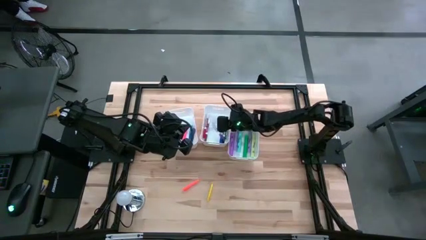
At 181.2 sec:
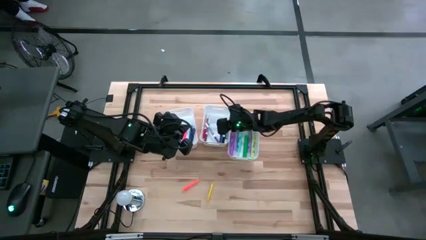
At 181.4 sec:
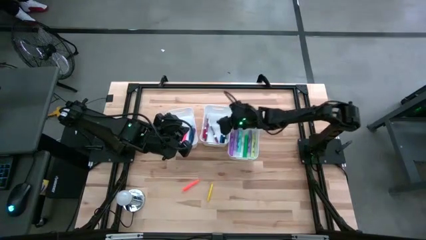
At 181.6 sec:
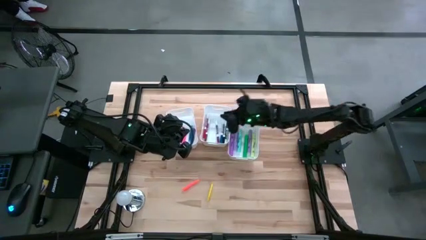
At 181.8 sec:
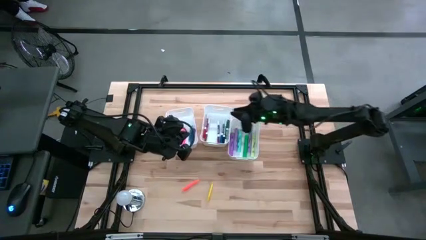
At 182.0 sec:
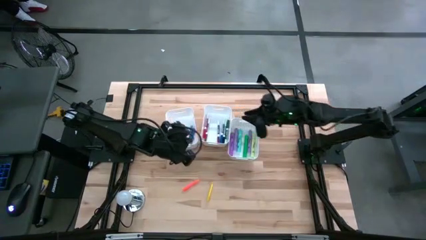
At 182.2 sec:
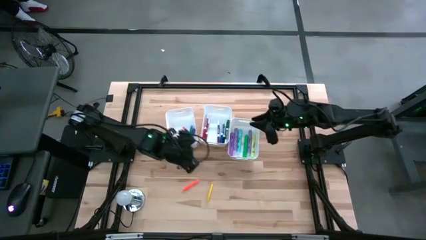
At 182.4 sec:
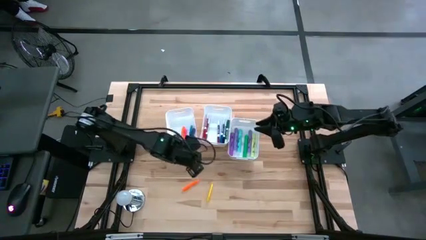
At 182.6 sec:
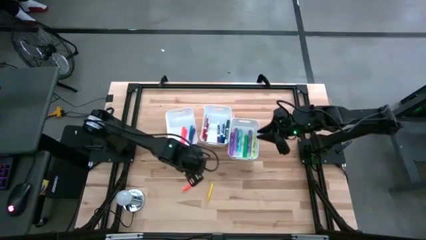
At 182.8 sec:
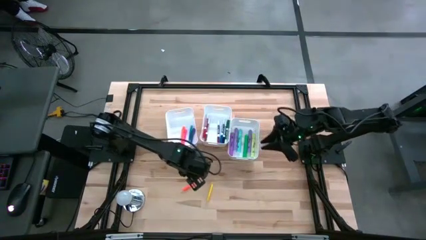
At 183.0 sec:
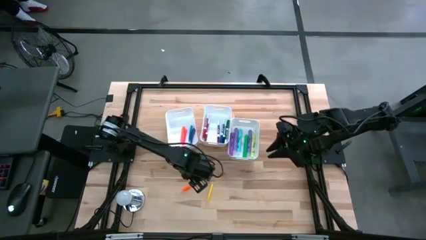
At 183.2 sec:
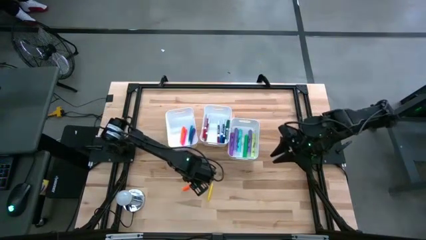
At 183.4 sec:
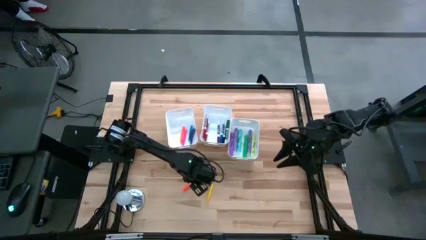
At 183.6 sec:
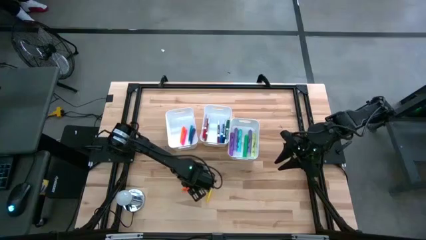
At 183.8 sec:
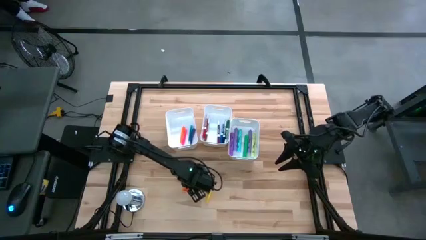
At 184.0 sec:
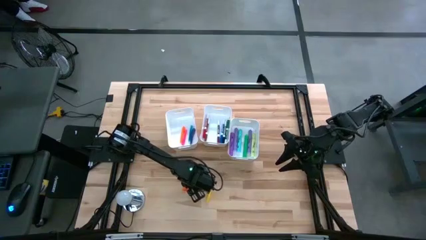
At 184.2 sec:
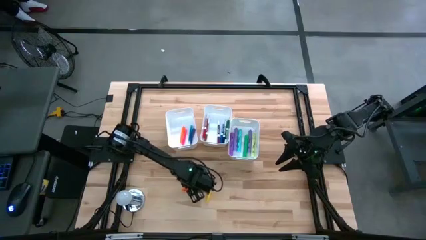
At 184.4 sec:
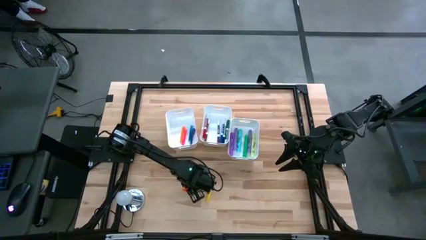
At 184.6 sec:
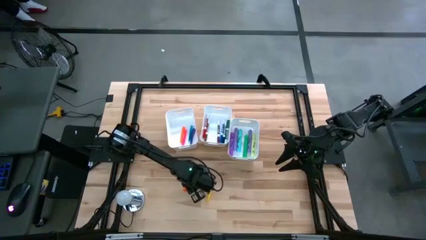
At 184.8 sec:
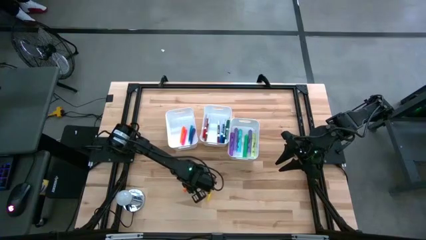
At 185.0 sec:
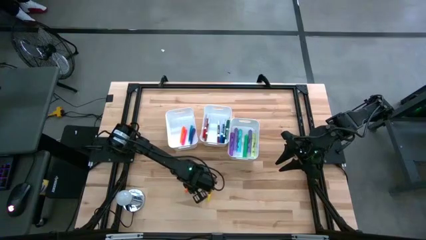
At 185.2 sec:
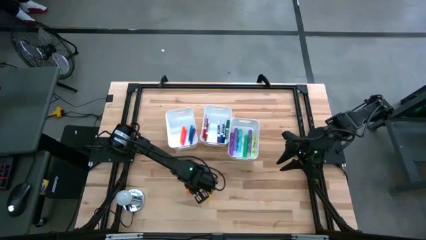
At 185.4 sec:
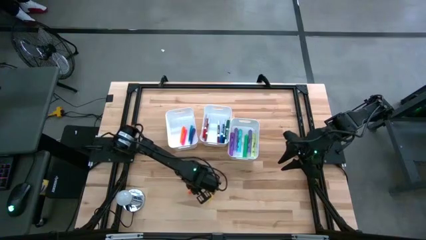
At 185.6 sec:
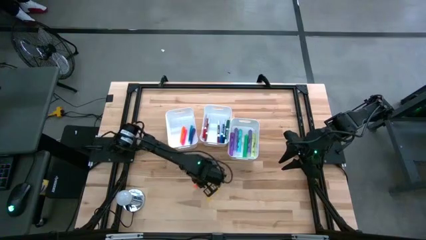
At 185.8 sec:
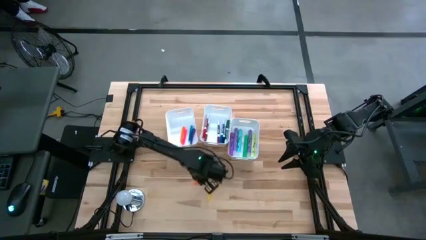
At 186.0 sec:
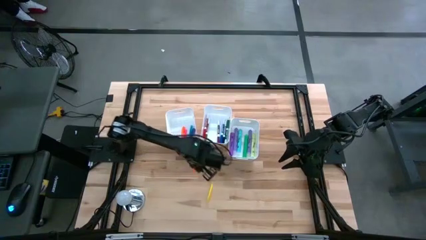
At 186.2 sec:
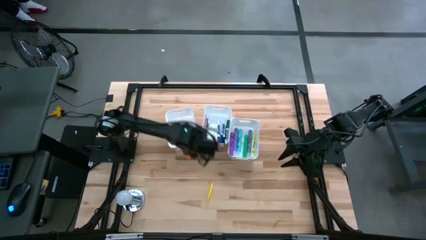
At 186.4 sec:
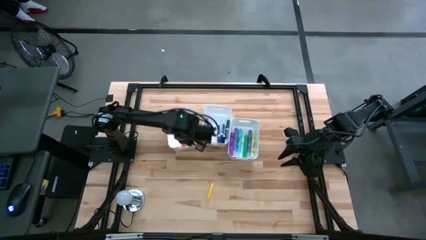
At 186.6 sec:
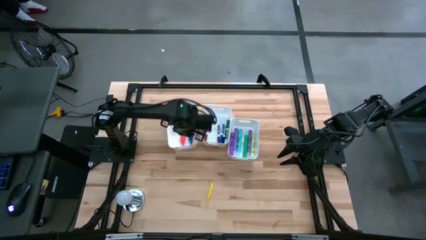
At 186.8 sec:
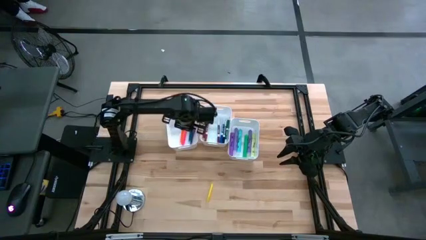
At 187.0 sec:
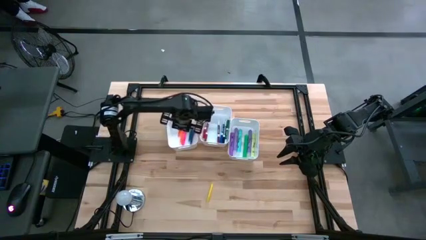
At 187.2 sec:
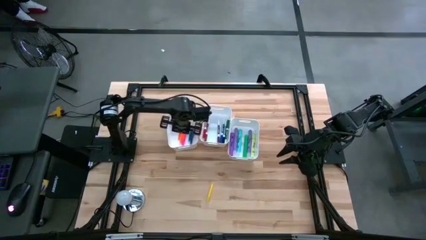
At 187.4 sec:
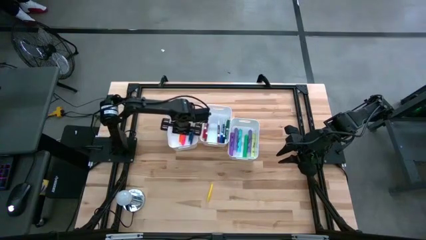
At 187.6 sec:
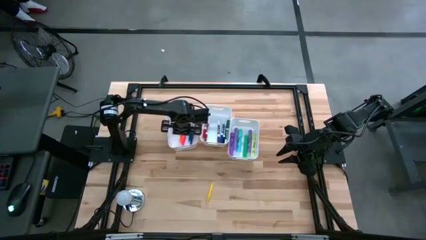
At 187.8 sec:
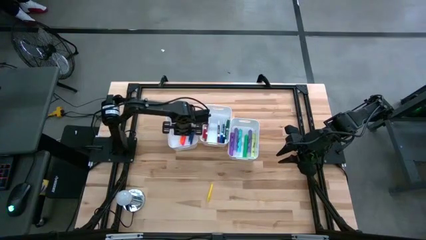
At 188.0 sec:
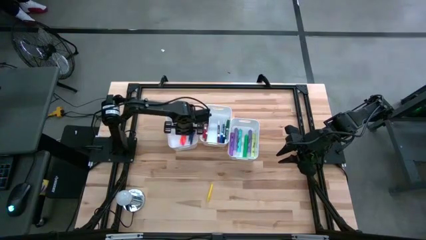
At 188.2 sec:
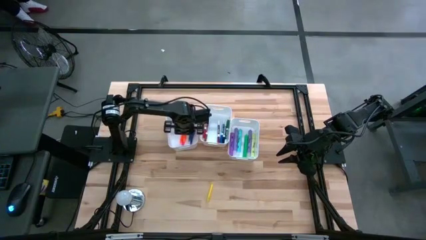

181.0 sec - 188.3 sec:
Task: Pick & Place Markers
Put the orange pen into the left white bin

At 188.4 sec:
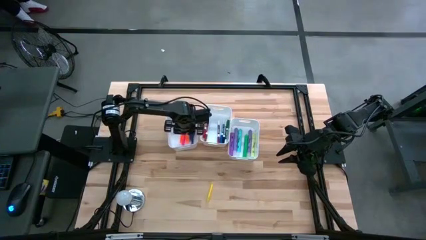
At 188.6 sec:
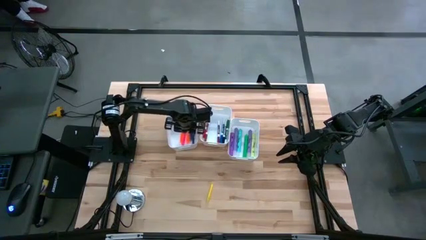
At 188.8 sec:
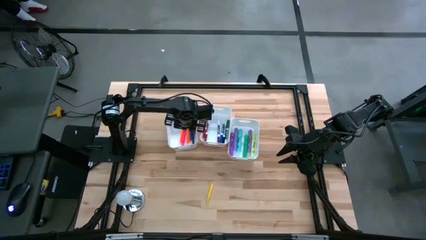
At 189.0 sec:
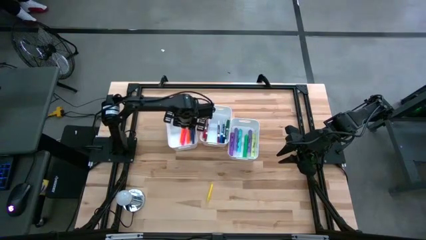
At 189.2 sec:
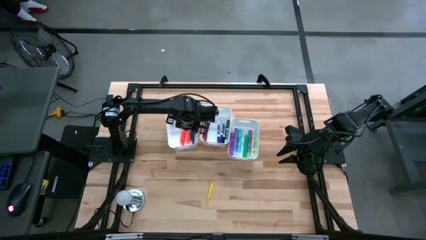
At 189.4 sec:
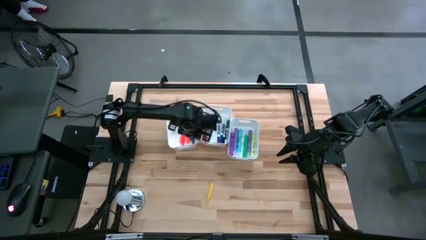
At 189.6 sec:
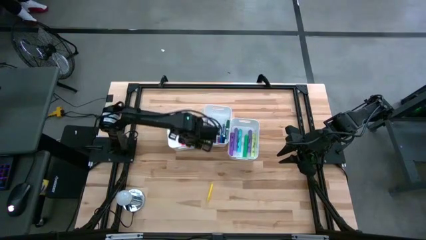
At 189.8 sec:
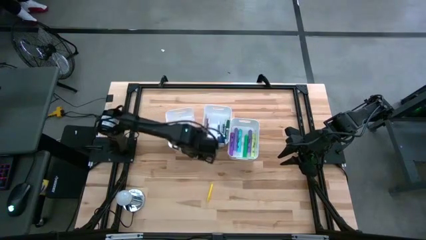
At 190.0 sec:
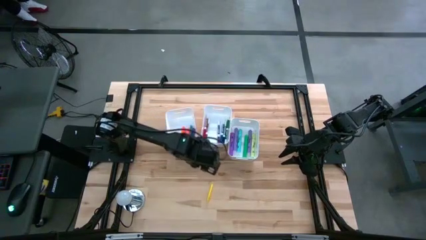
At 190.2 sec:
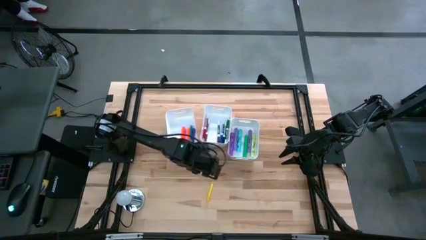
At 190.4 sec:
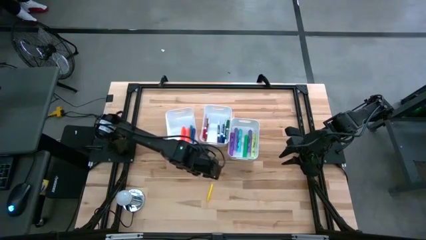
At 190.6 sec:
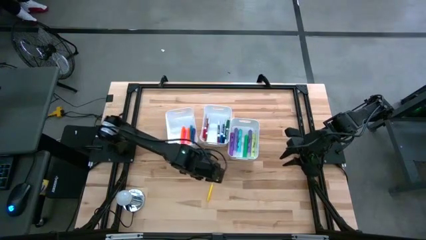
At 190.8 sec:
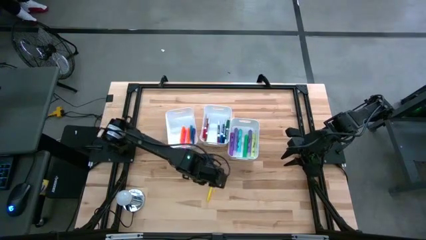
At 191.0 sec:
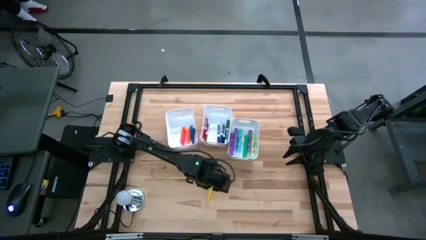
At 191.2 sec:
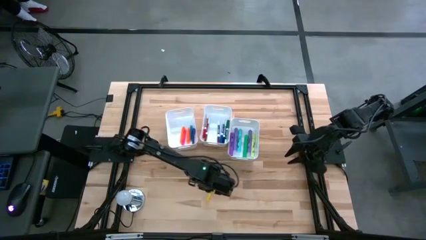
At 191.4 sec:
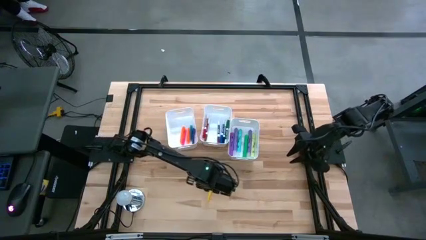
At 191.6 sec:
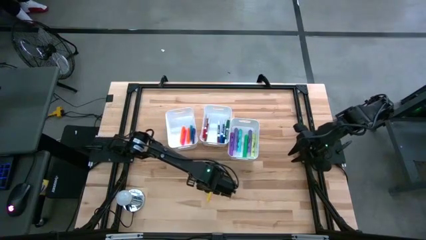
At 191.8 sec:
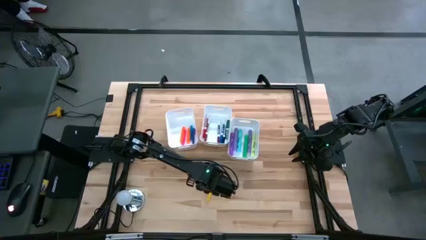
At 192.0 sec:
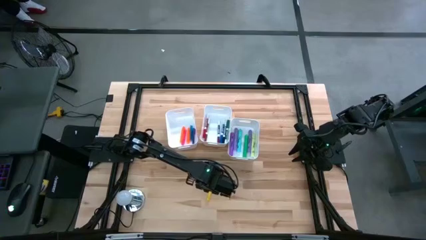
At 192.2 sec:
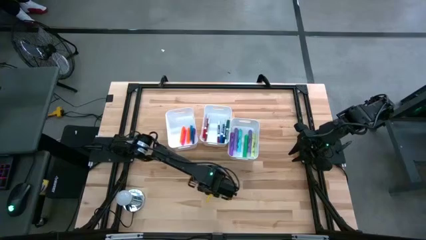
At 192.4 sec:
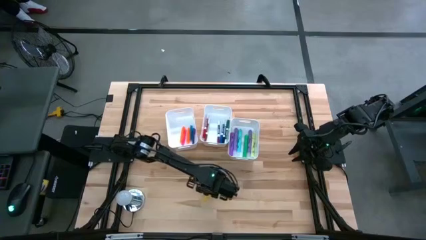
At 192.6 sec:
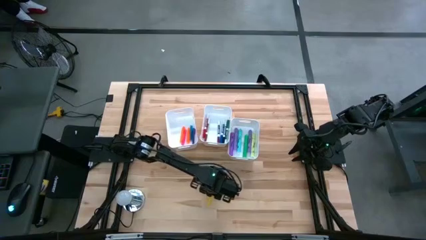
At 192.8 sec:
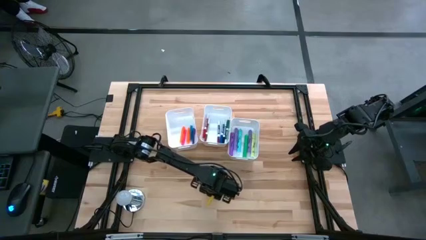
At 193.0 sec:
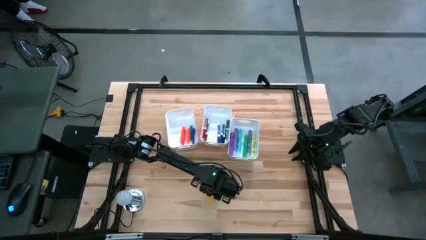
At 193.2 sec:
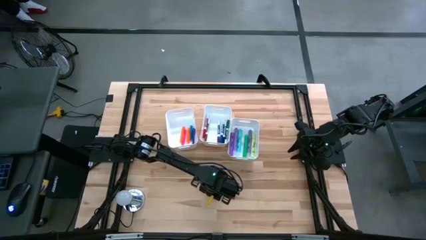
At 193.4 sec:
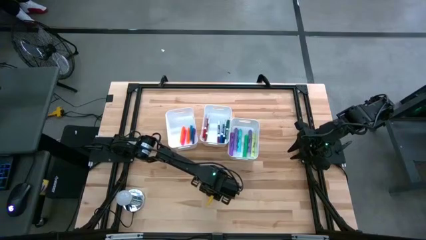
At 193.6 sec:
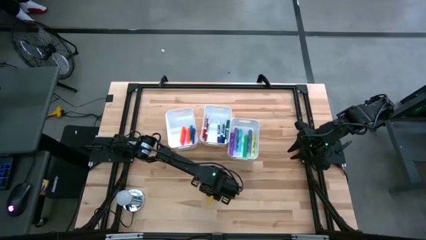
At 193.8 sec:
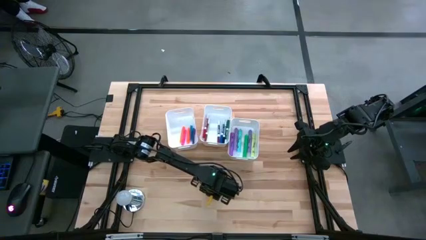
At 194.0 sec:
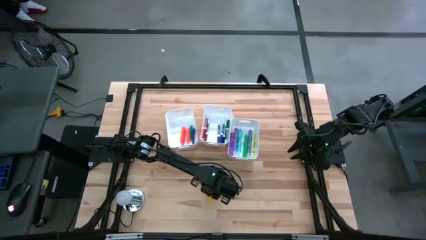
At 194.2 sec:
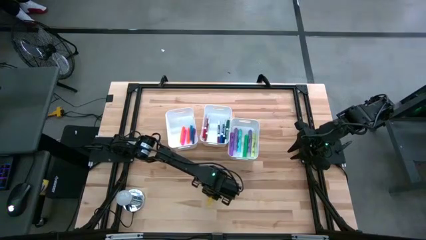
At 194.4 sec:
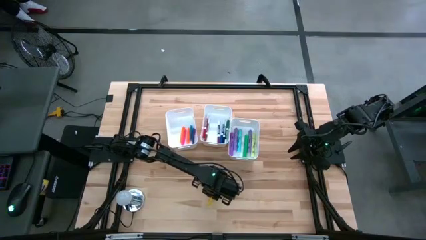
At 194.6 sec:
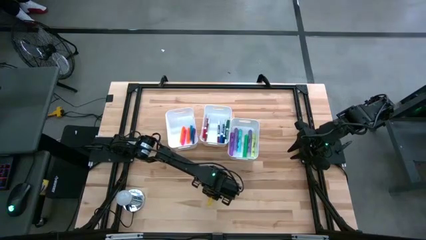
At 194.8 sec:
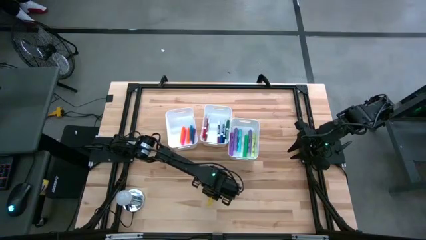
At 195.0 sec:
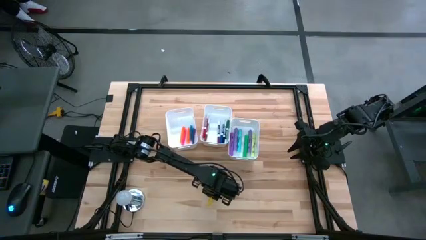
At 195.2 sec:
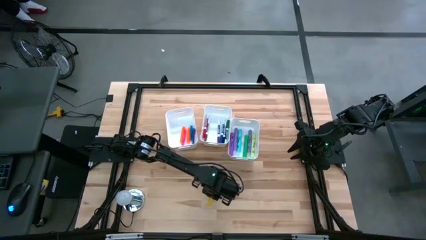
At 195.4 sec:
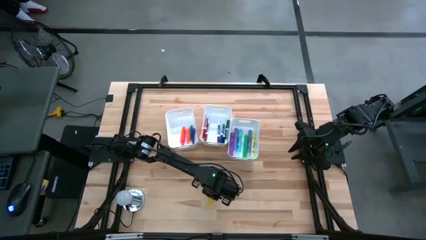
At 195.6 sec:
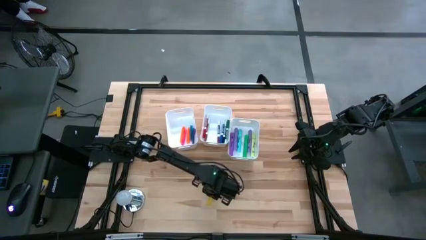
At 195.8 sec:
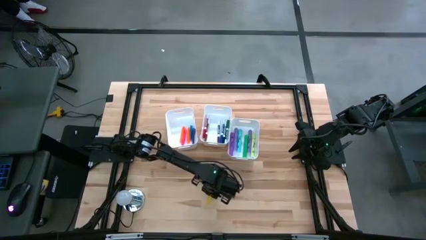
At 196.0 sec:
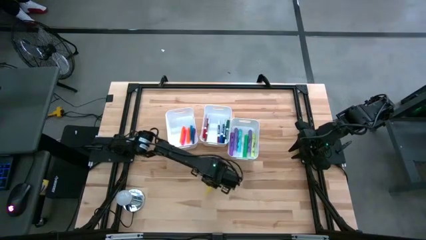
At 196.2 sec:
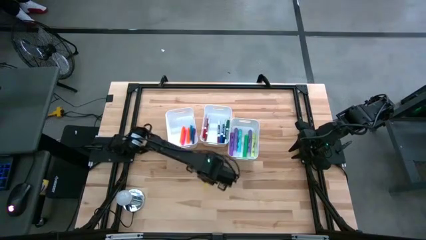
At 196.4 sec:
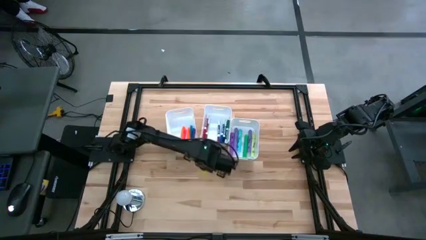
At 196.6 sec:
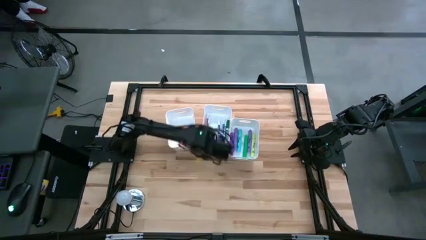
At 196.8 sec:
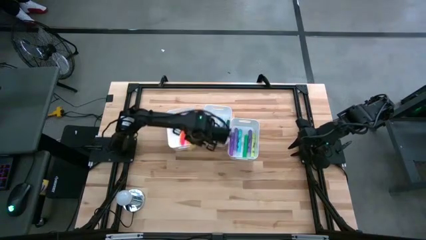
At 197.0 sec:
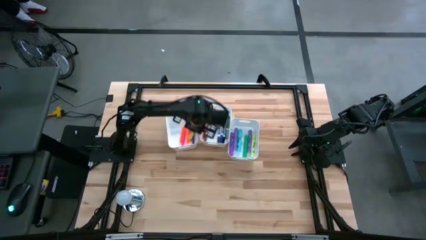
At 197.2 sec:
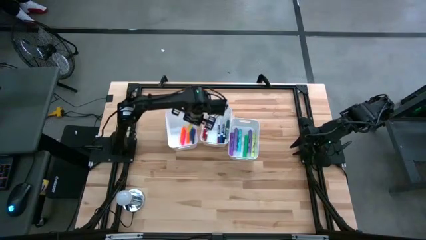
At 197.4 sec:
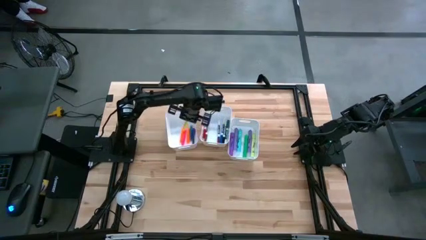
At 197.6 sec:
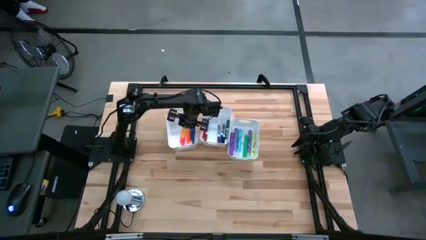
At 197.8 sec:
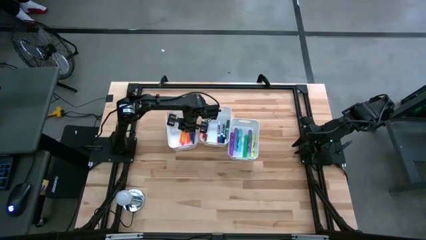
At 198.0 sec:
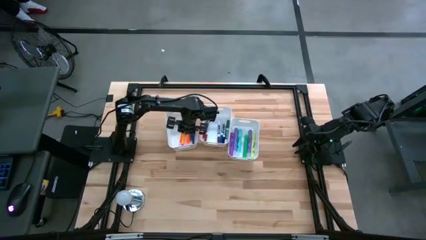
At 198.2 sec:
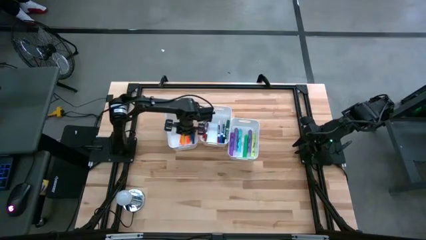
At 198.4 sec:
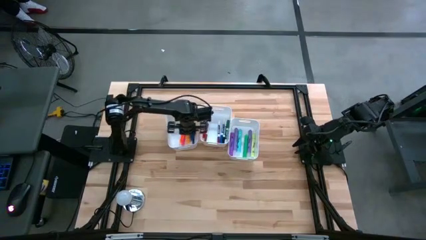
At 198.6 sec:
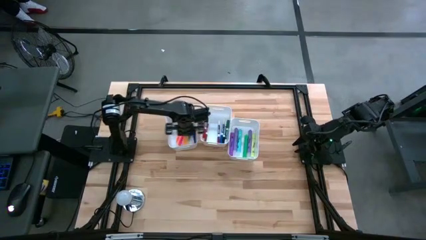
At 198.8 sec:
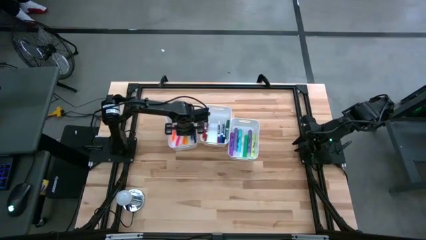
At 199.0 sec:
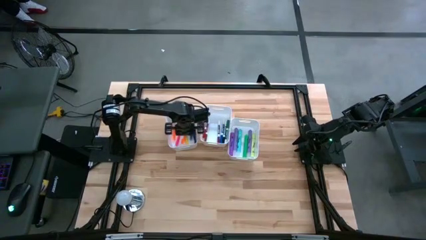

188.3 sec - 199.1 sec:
Put the yellow pen into the left white bin
